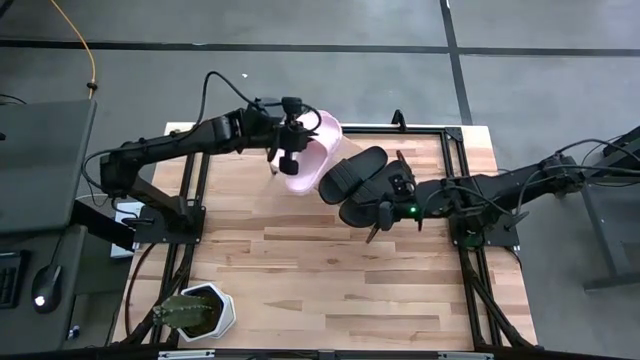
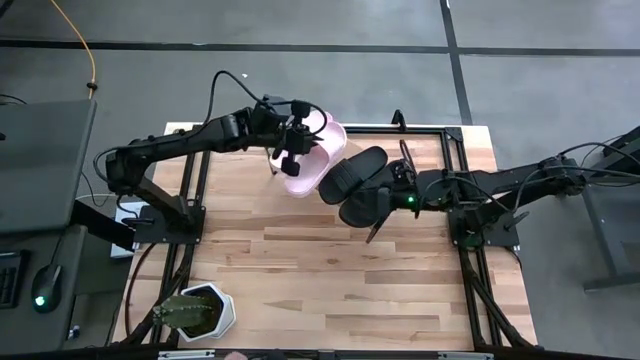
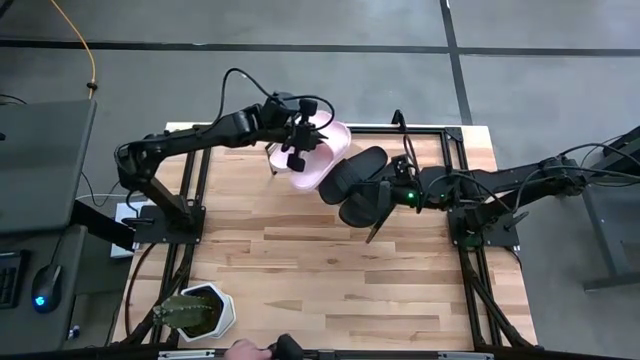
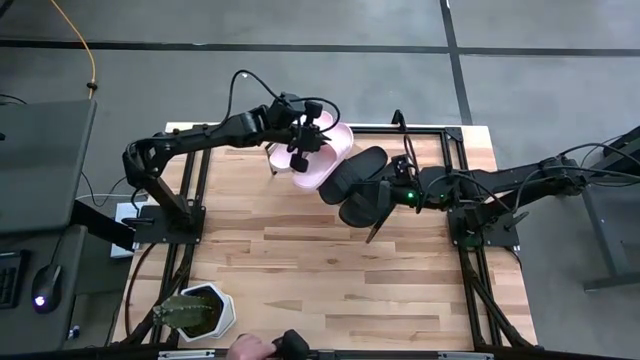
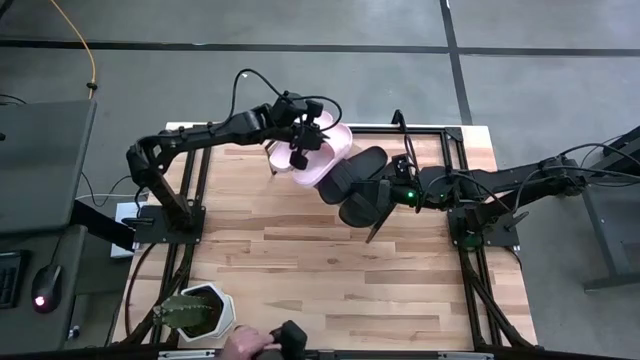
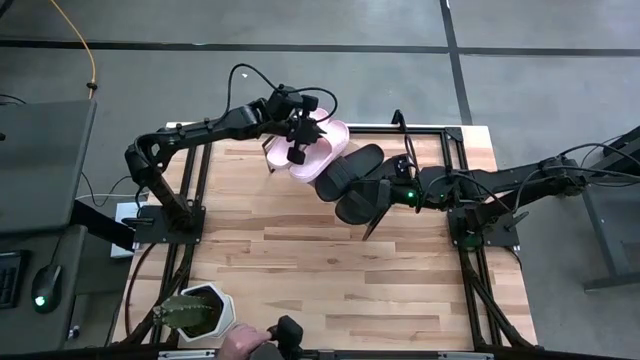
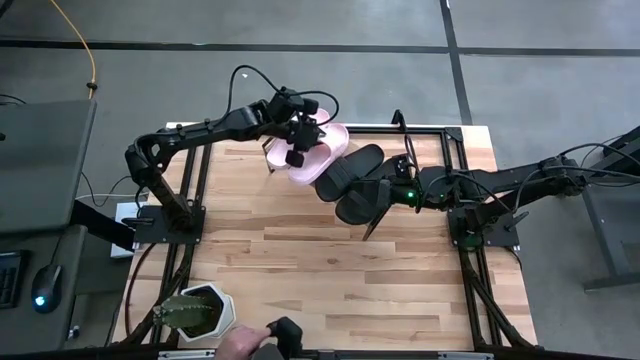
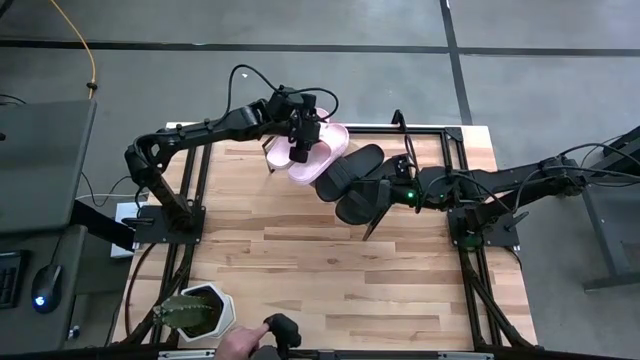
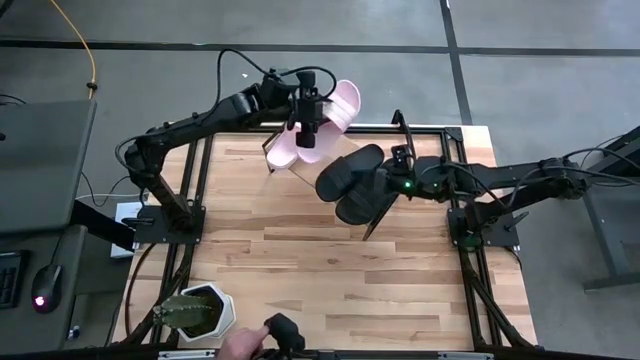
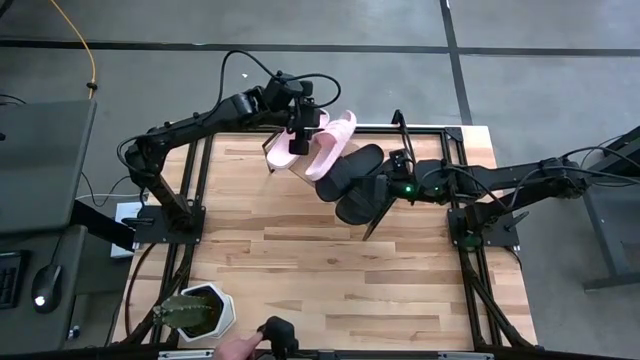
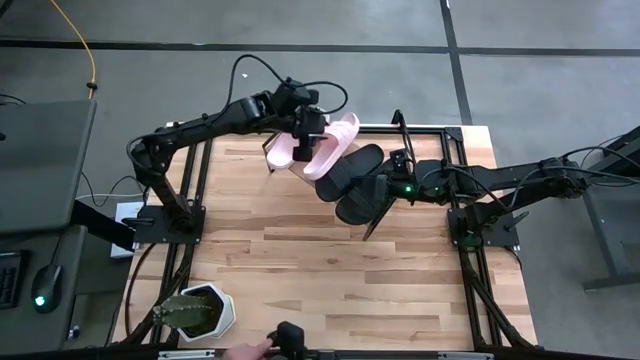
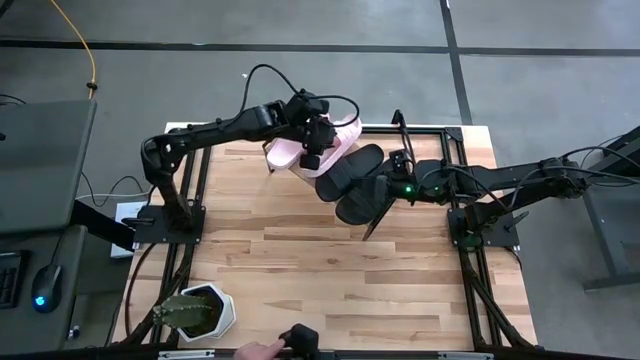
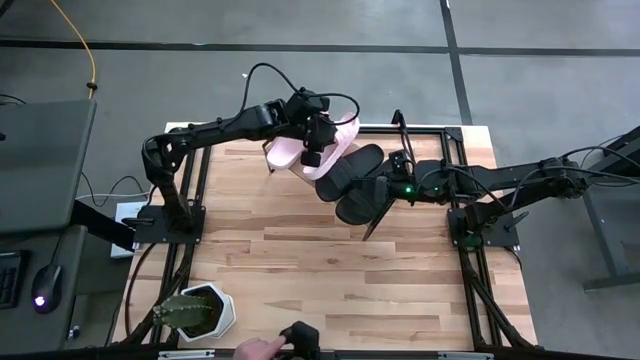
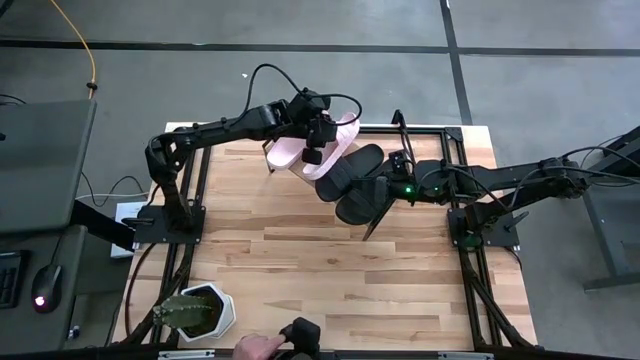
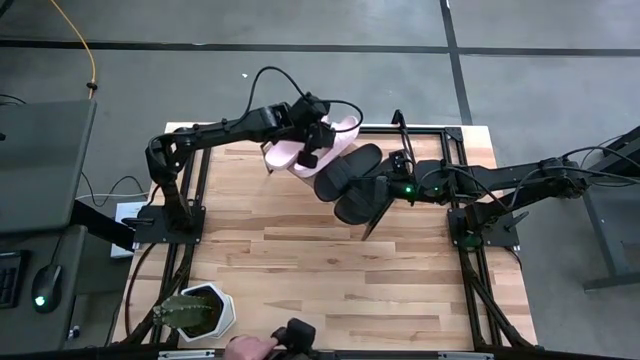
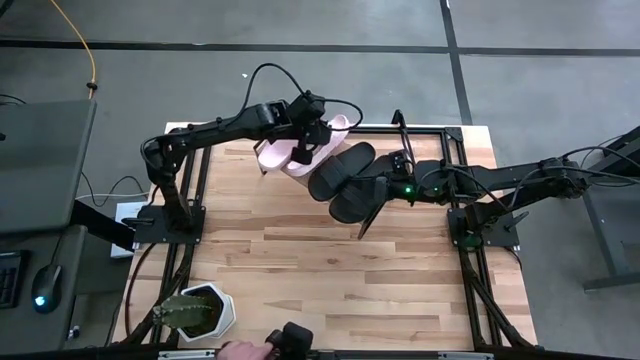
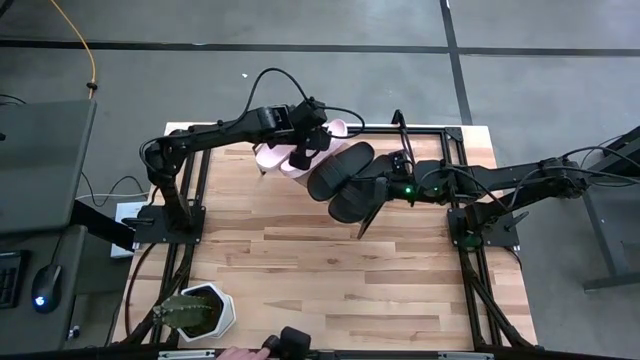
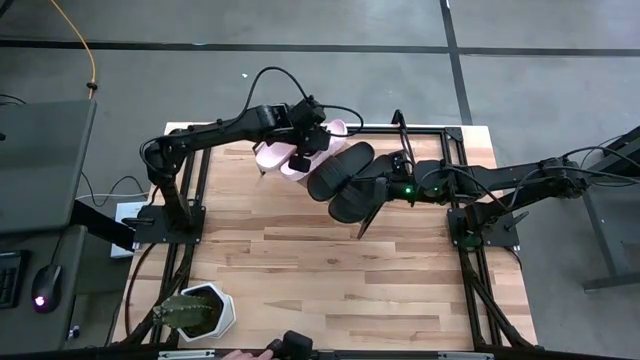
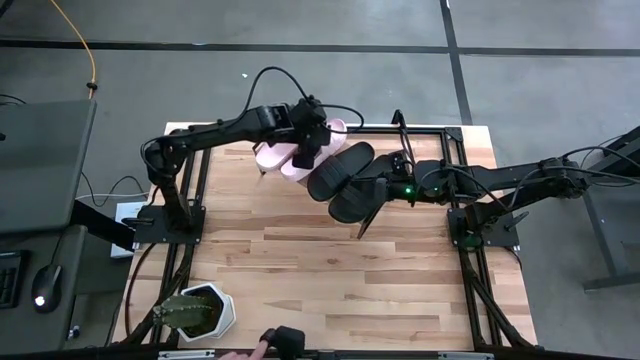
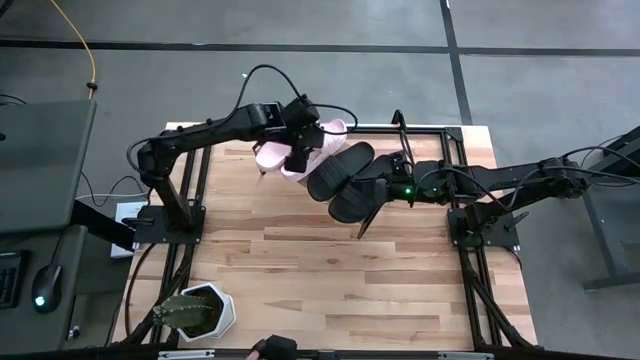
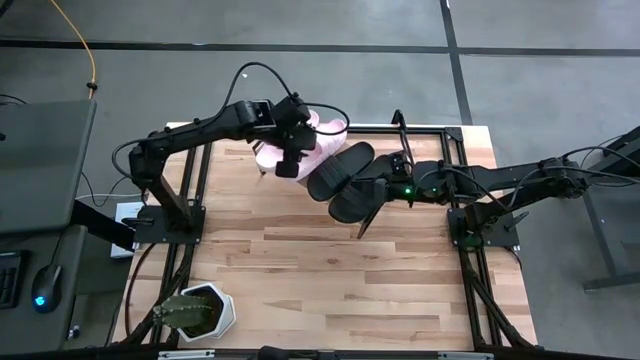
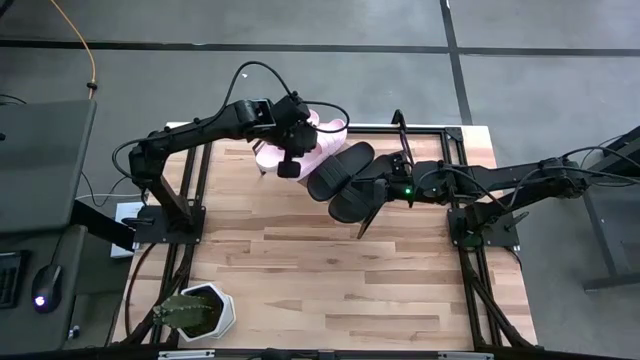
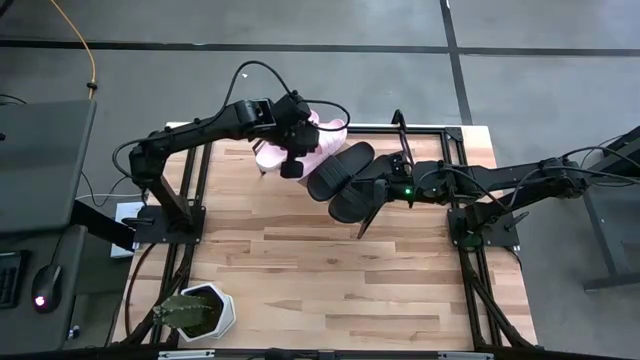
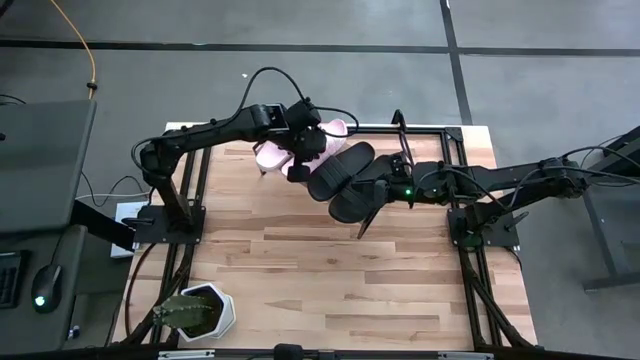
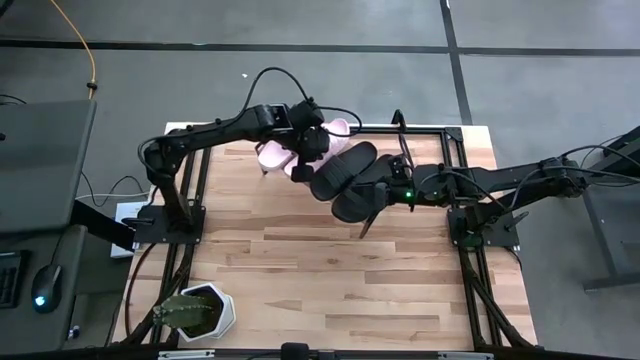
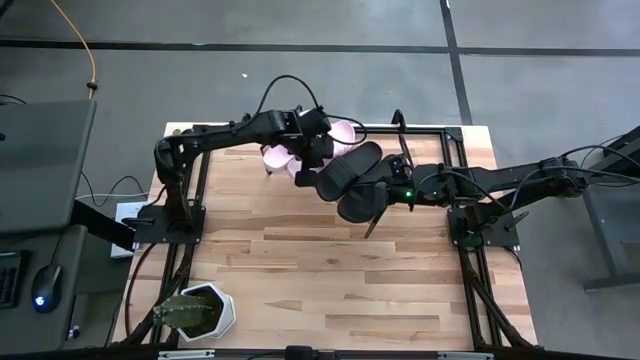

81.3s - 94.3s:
Task: Pick and place slides into the shelf
Put the pink slide on the shelf

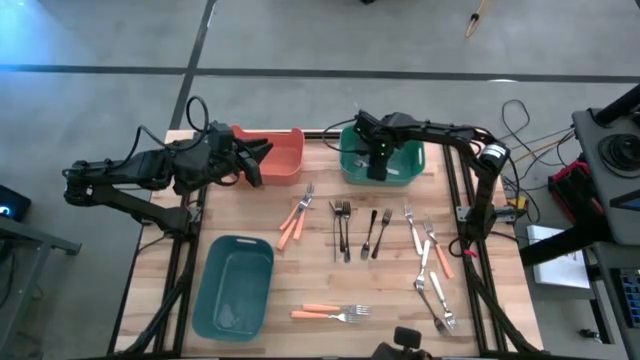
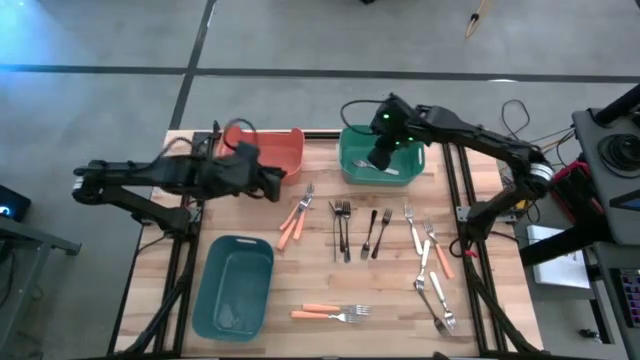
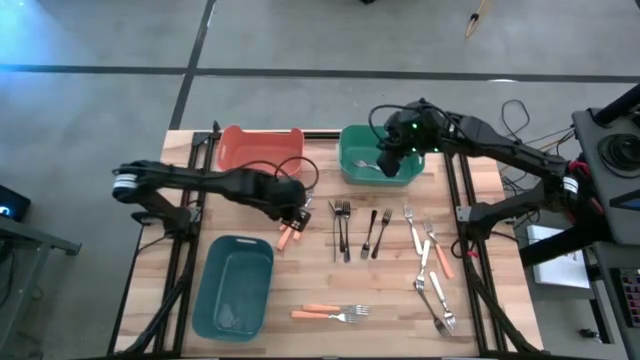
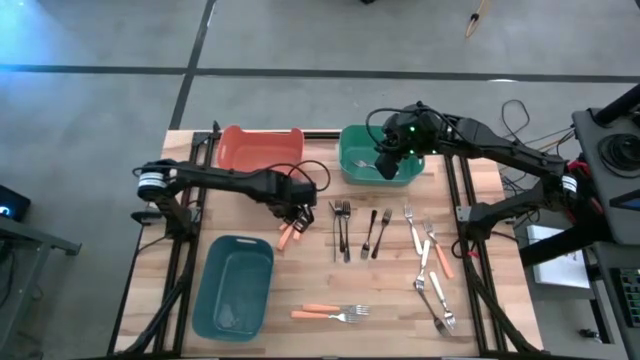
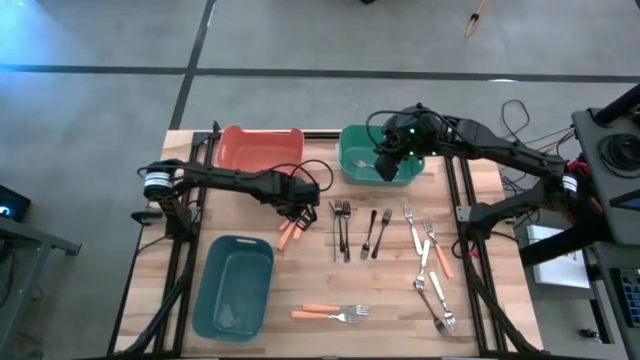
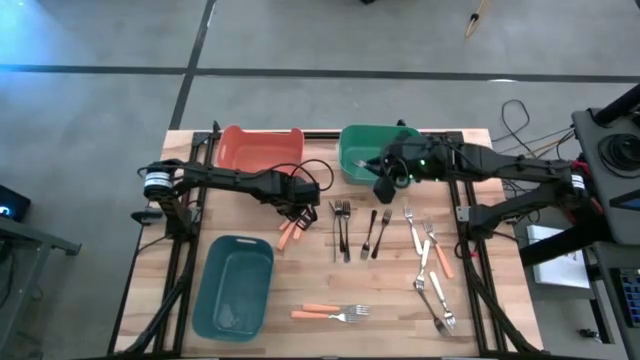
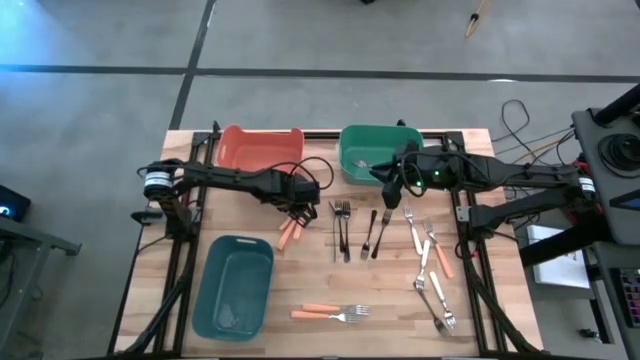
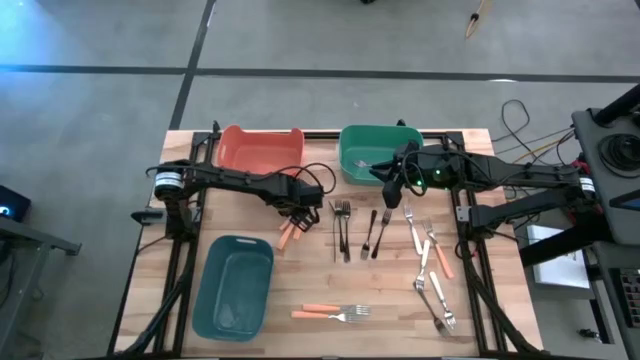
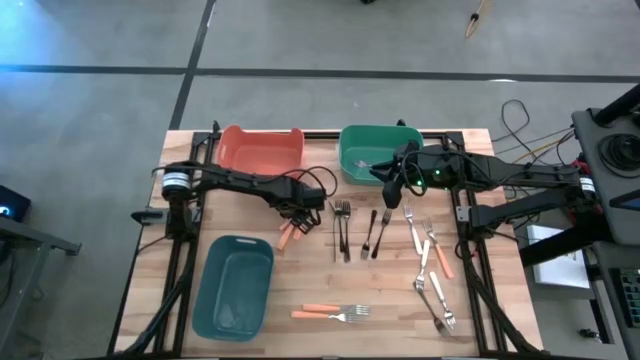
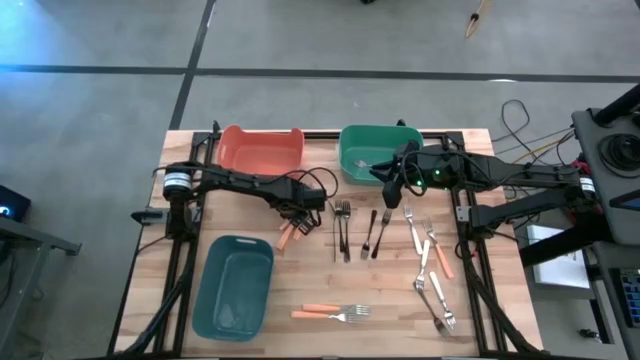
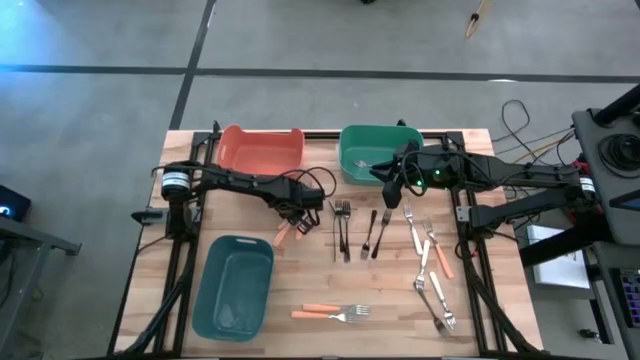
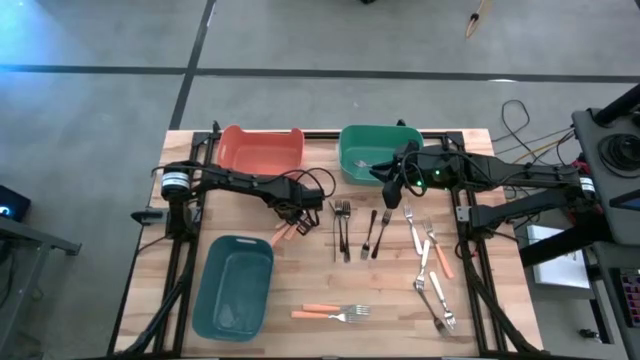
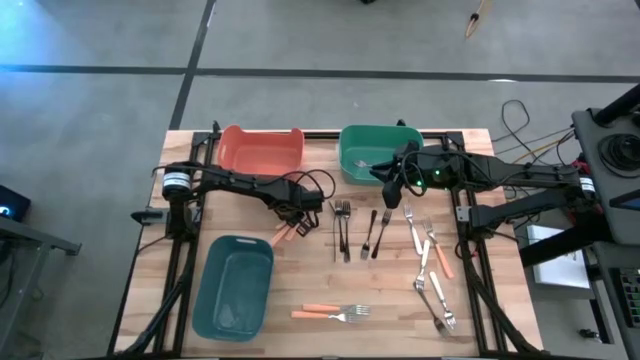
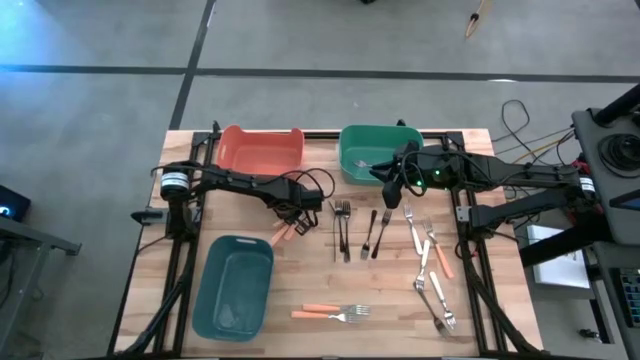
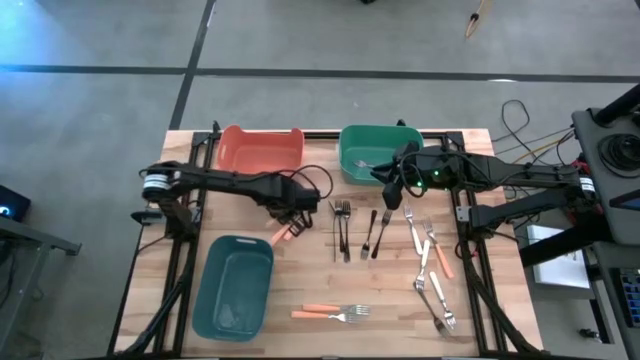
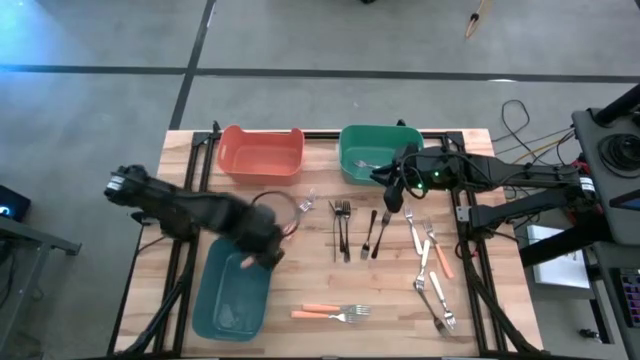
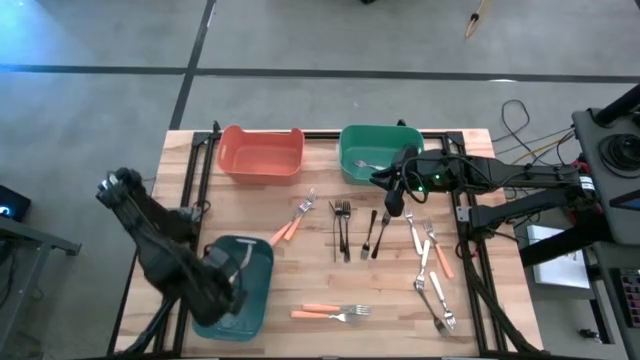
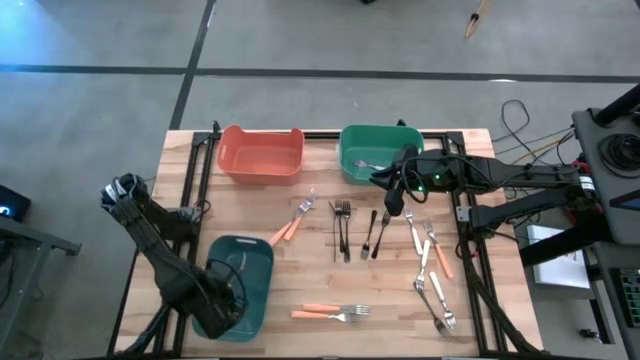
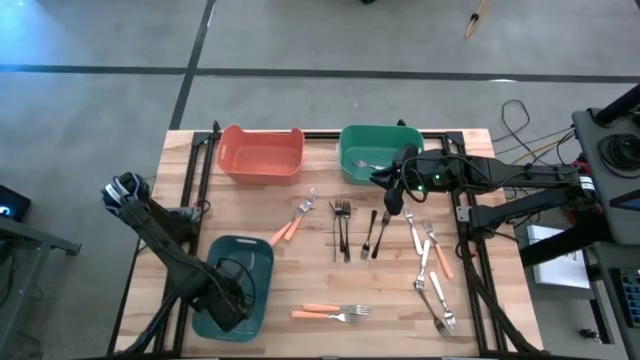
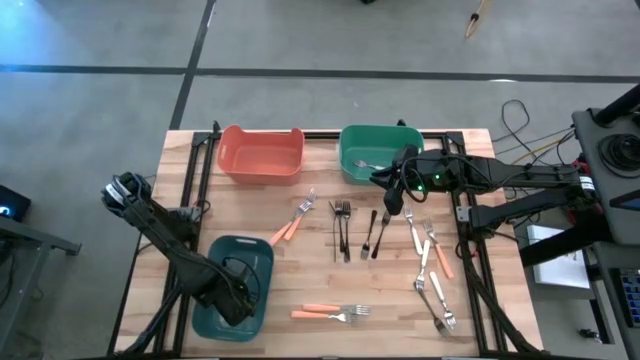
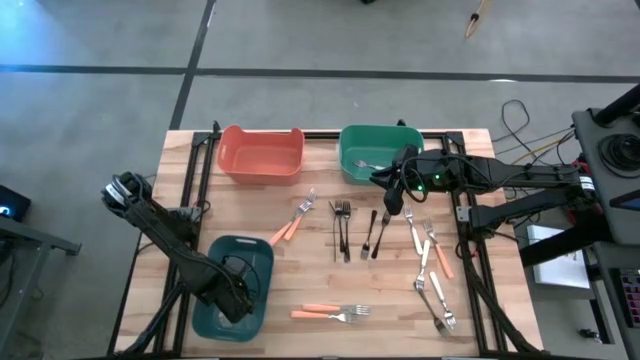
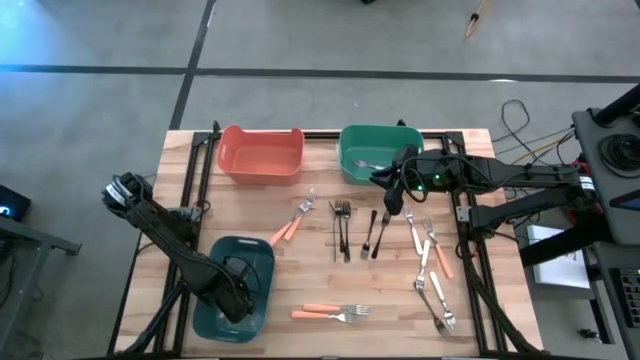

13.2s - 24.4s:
Task: Sort silverware by color (type)
Put the orange fork into the blue-green bin
